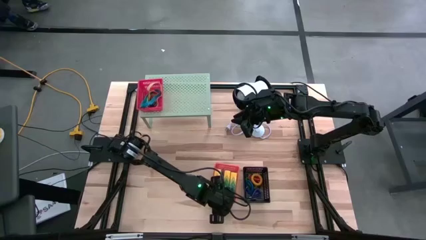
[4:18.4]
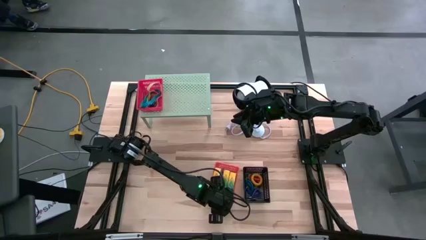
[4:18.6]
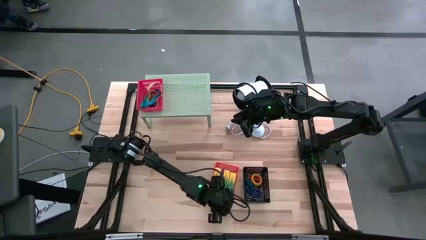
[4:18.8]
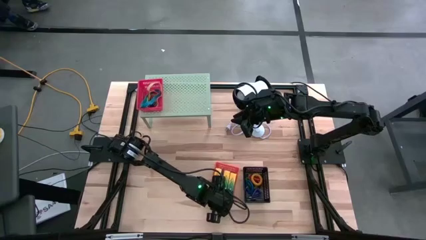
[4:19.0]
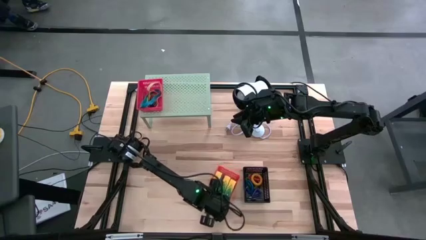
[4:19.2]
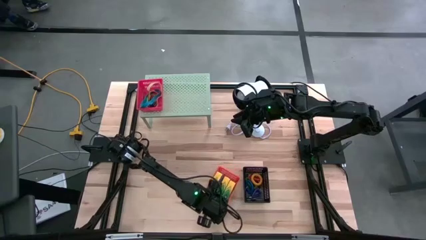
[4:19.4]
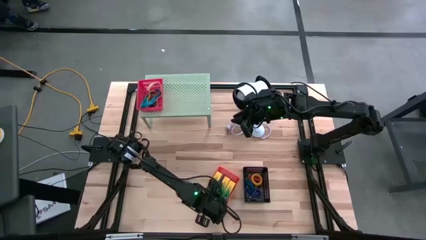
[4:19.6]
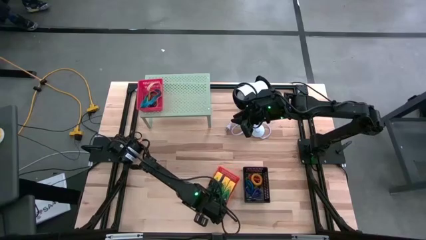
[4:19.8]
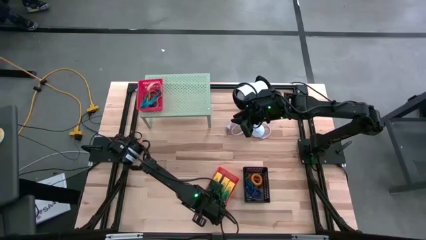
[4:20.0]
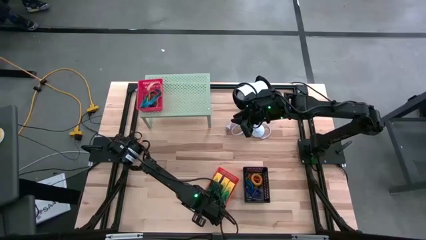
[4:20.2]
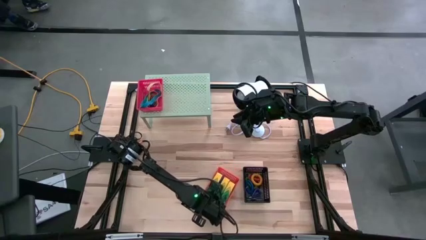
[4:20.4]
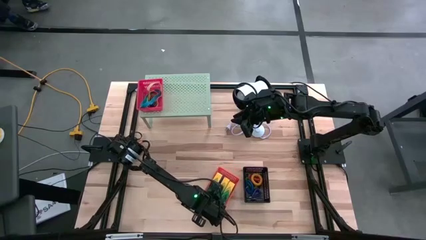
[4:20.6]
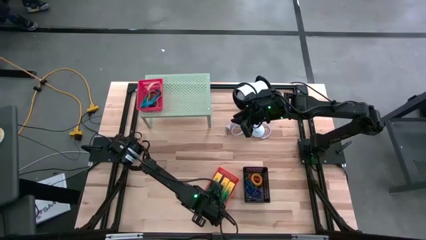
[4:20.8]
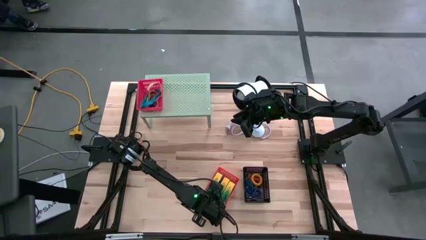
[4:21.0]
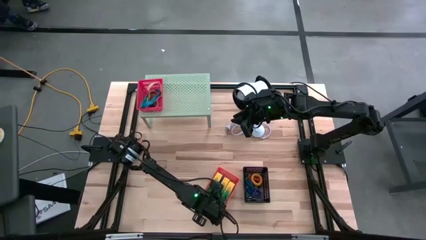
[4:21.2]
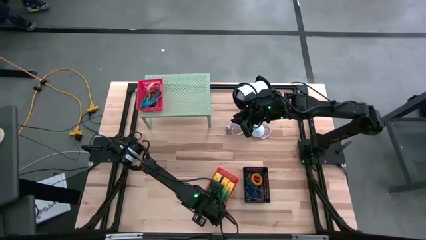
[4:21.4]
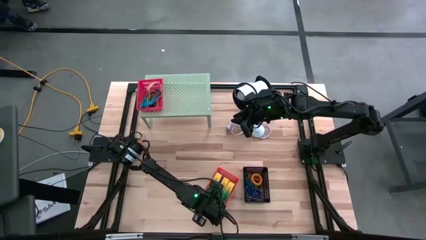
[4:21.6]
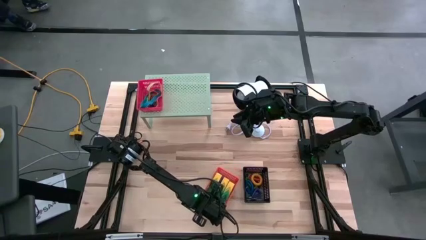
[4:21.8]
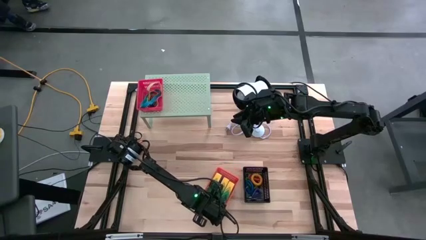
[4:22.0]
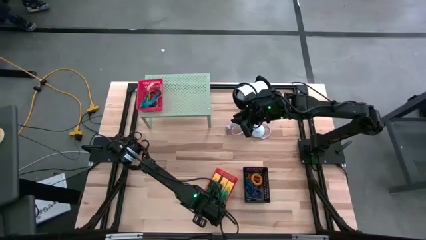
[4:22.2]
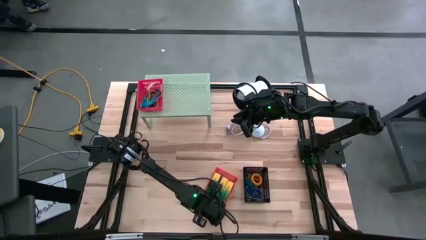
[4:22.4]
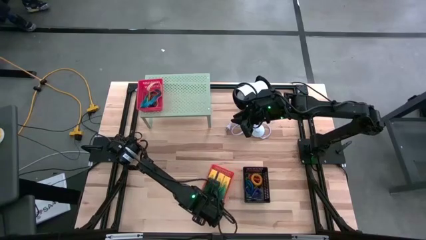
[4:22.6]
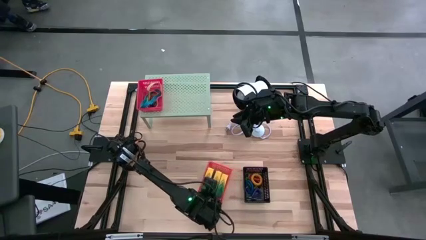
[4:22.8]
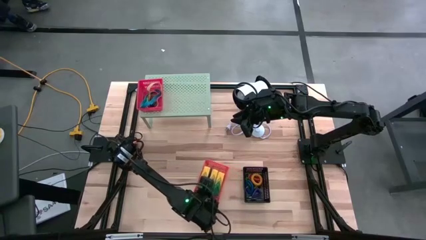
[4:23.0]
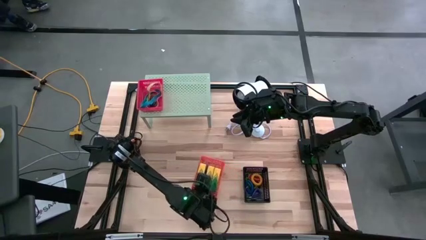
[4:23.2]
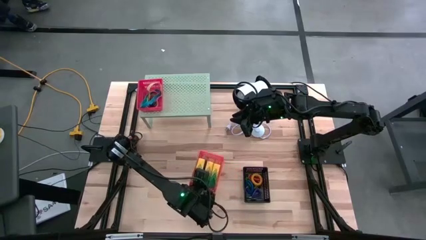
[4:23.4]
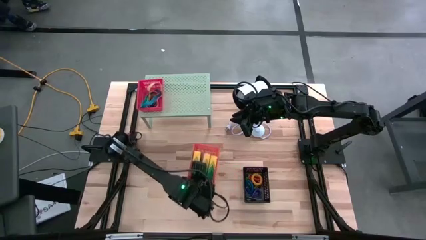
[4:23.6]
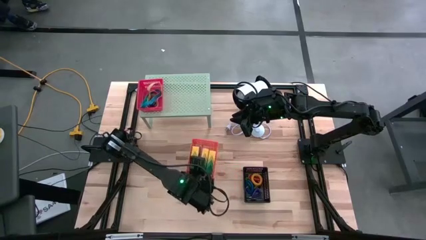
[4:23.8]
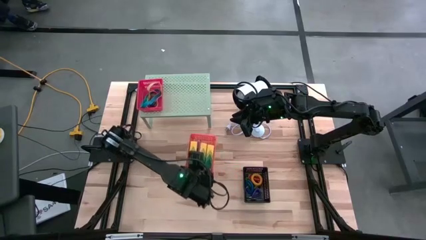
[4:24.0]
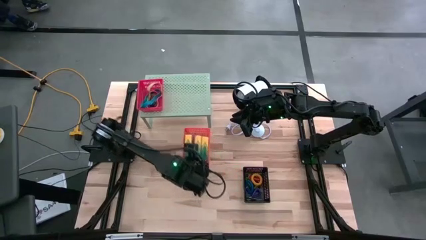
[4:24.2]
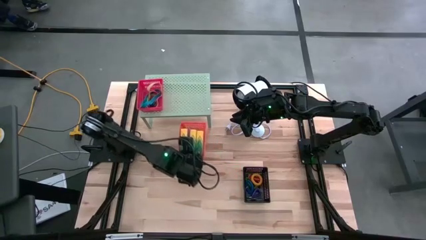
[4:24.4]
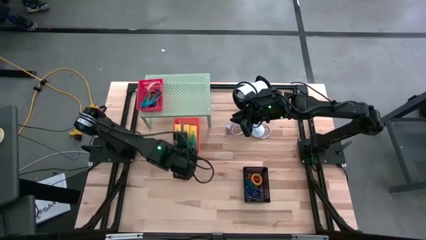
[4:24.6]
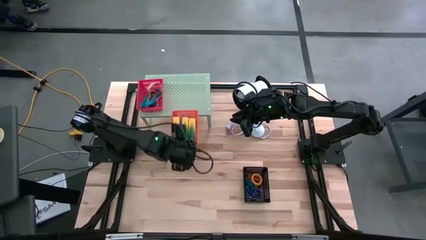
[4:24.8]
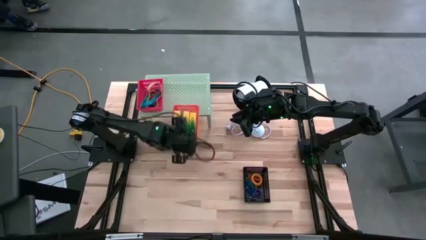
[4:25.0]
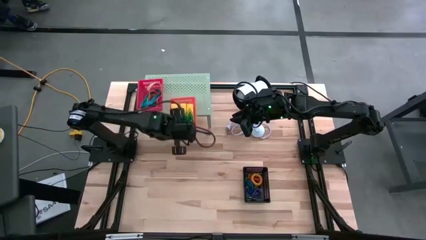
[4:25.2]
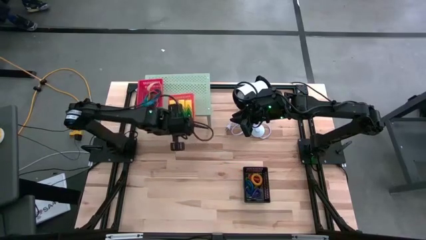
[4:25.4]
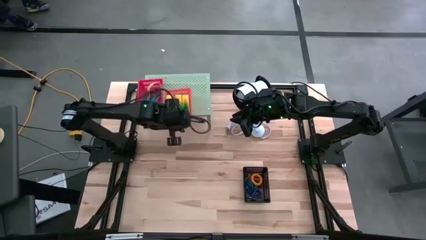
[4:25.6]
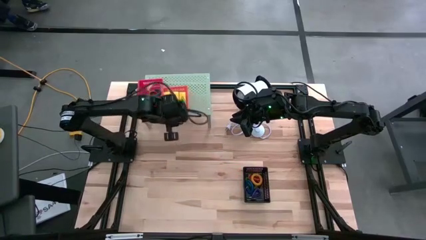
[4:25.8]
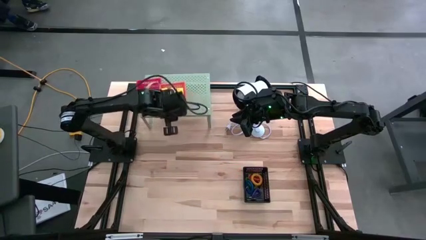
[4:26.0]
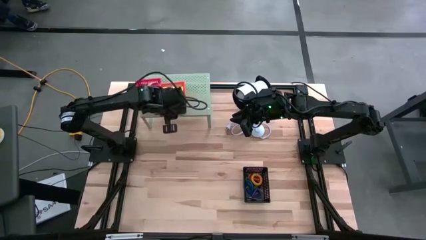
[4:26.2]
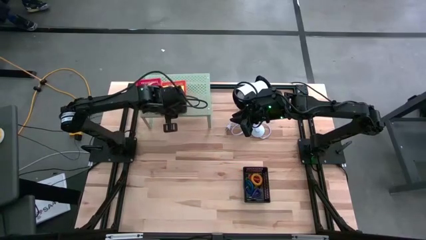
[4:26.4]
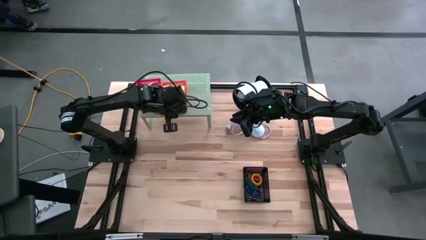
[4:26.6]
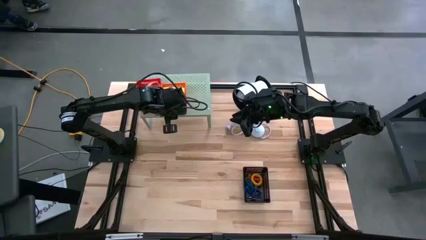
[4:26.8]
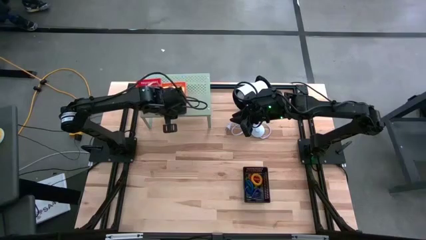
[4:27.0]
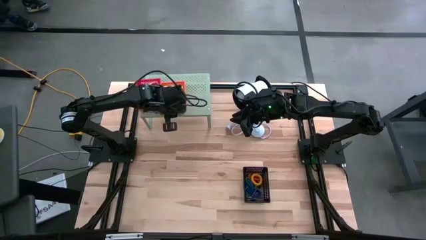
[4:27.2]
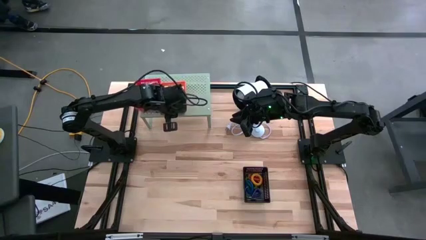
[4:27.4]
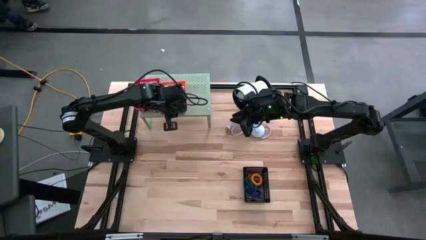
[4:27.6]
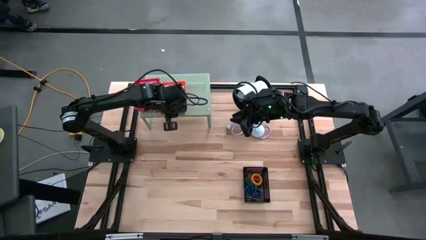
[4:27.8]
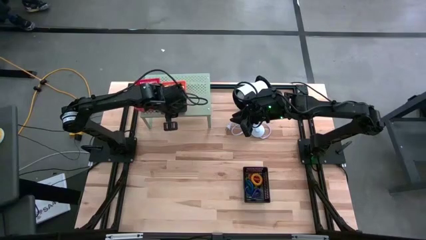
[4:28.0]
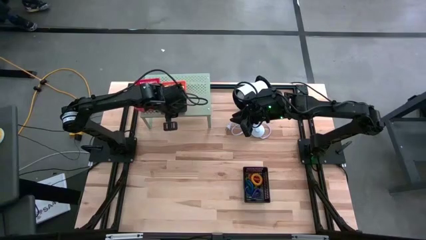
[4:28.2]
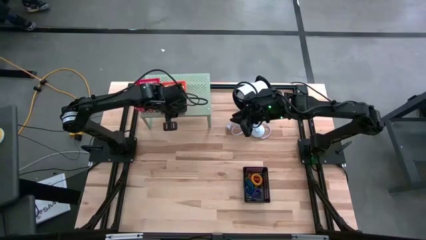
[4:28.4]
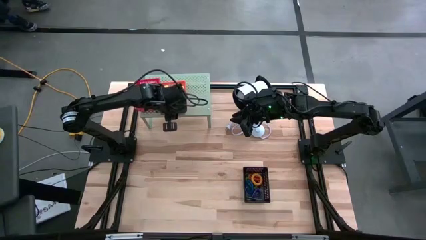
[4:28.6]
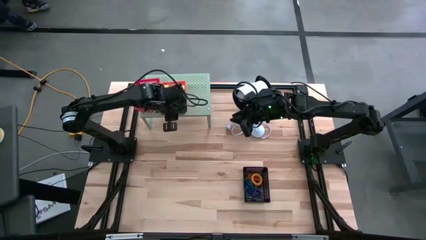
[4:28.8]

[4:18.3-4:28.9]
Task: Pick & Place Office Desk Supplies
Put the orange basket on the shelf

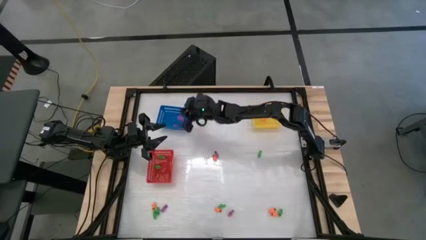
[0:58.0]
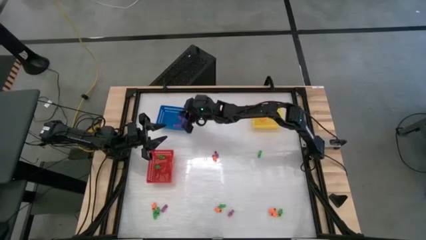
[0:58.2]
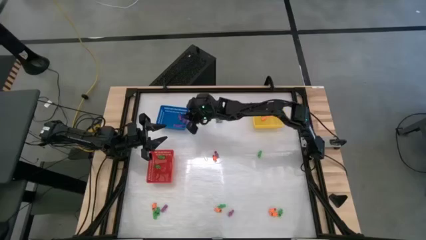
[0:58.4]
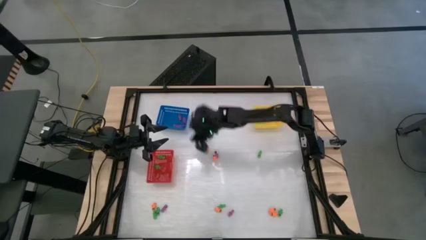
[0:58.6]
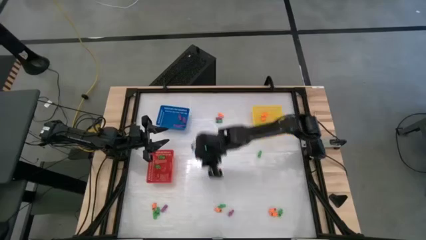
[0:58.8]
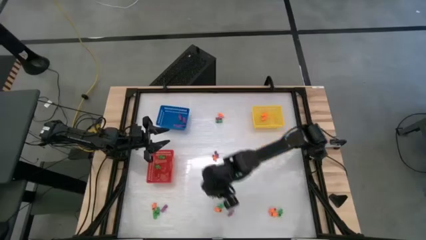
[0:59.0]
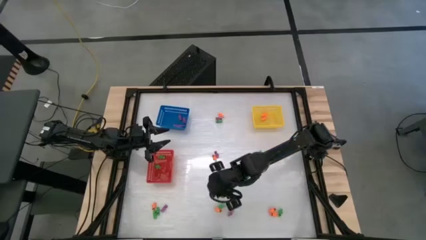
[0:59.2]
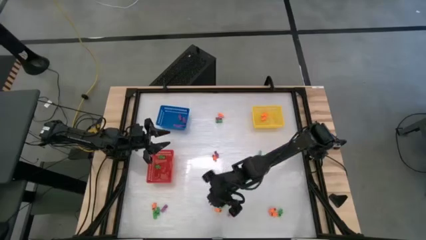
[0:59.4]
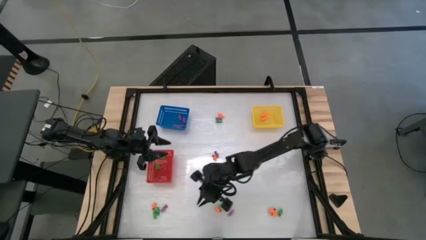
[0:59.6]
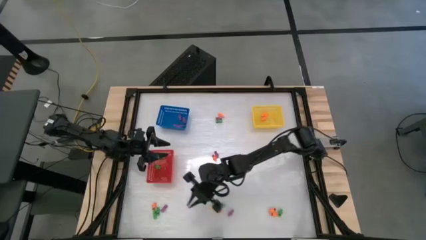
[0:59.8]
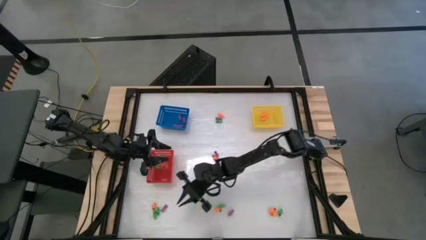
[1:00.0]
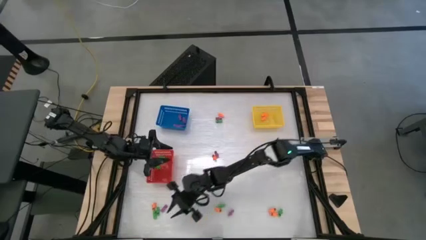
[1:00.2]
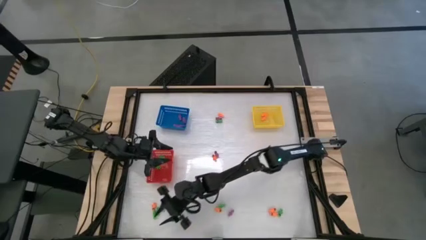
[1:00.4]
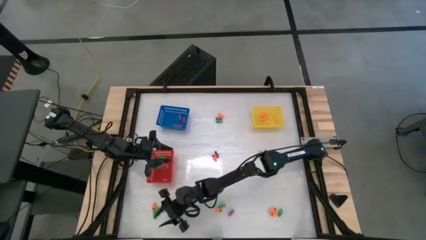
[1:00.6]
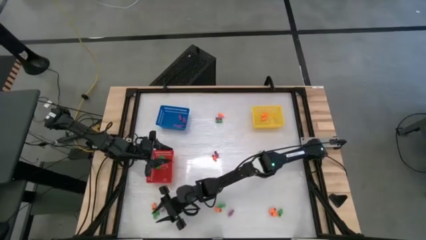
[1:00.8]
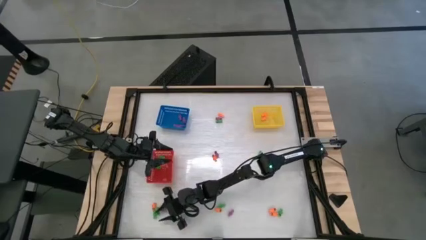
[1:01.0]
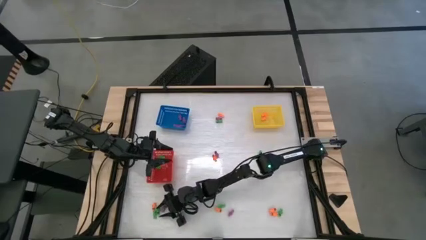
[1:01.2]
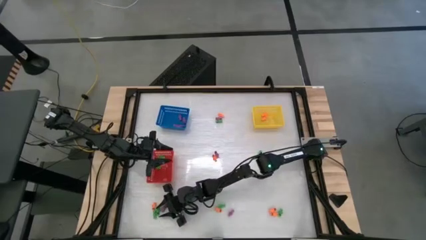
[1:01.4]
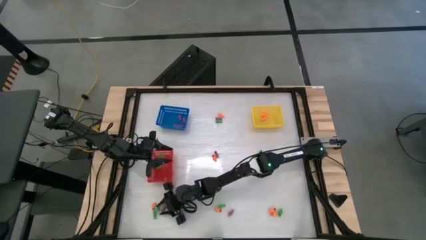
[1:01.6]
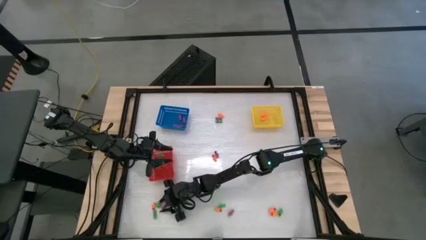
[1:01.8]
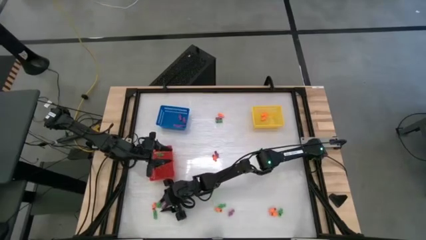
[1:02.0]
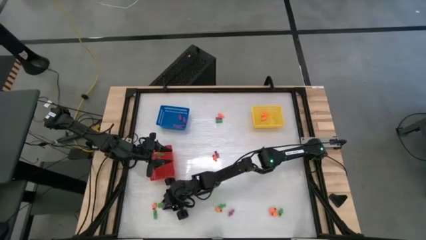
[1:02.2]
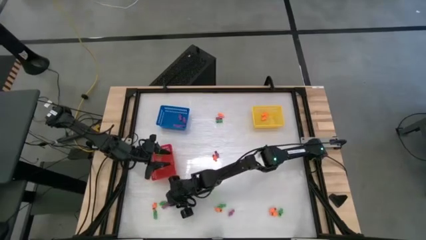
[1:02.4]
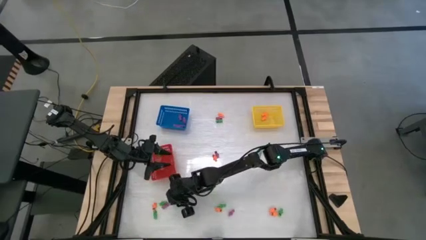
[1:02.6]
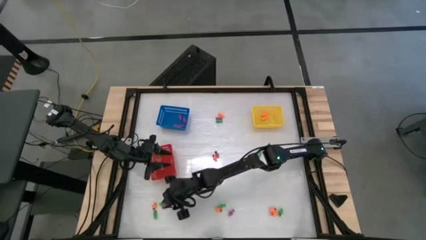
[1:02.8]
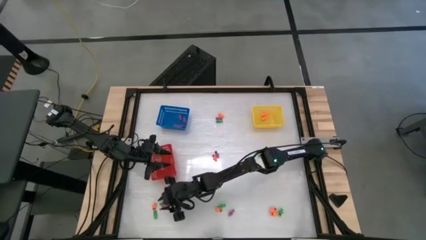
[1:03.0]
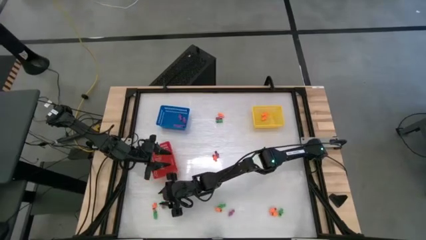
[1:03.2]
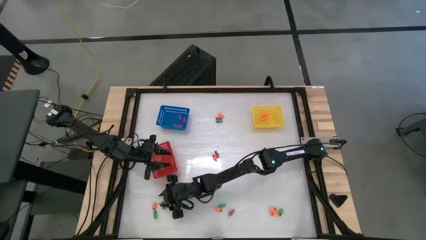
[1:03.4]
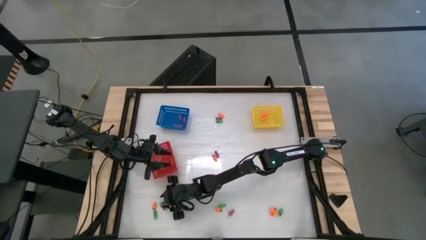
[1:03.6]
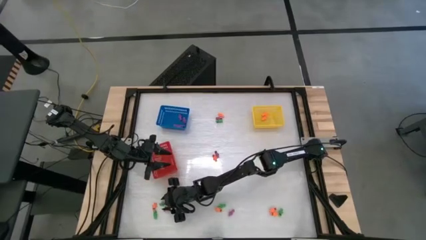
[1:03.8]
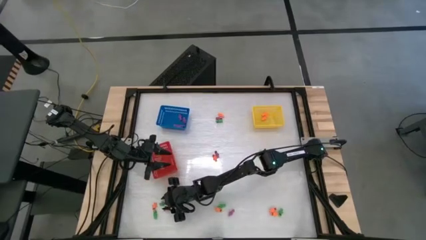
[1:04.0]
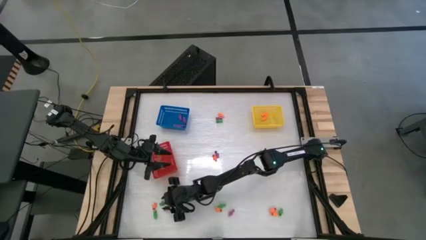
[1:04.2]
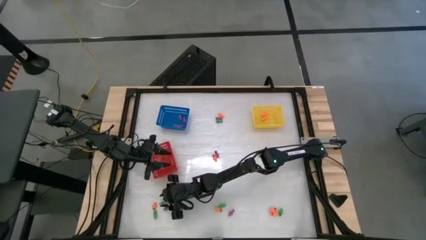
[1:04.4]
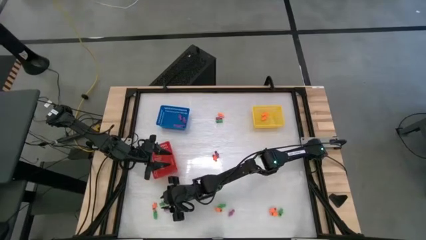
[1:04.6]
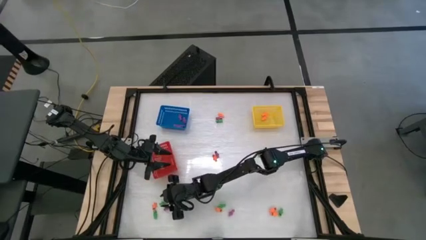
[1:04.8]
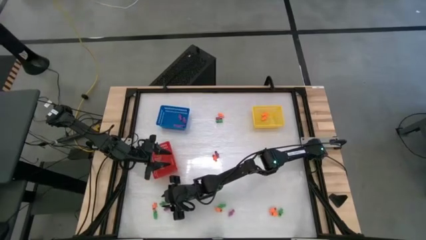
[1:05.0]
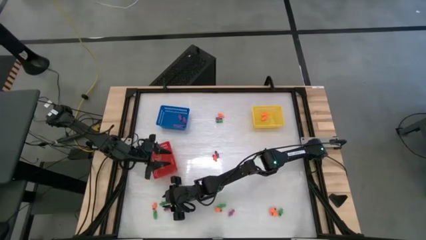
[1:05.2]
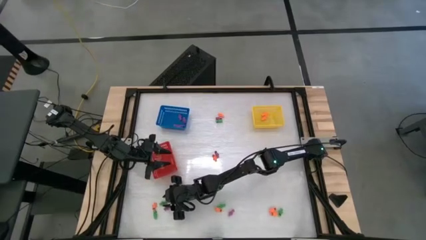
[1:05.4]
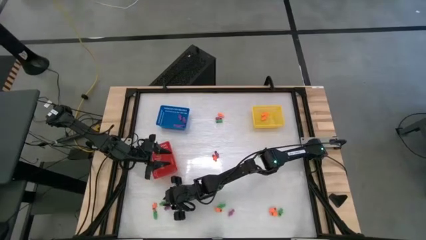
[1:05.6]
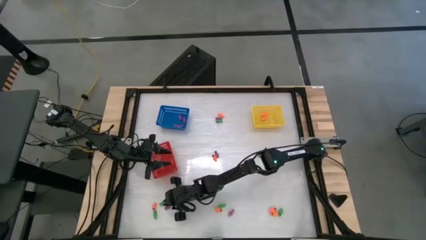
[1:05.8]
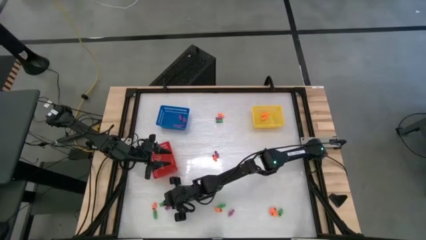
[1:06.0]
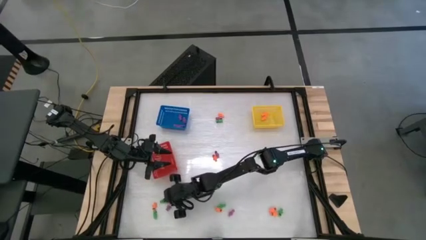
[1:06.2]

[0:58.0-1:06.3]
Task: Sort Halloween decoration
Put the green skeleton toy into the red bin
